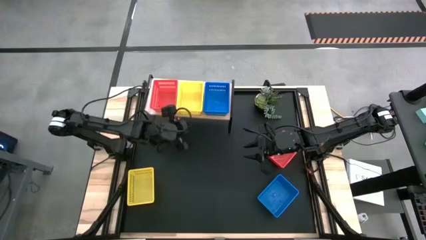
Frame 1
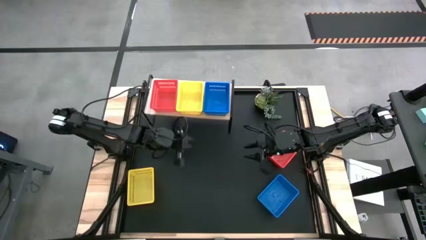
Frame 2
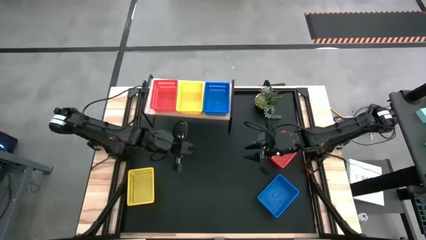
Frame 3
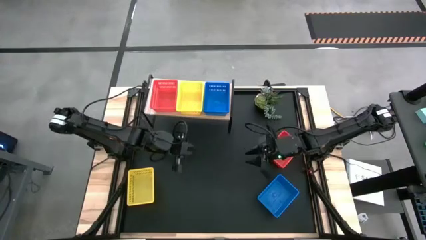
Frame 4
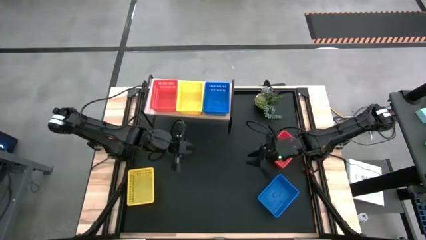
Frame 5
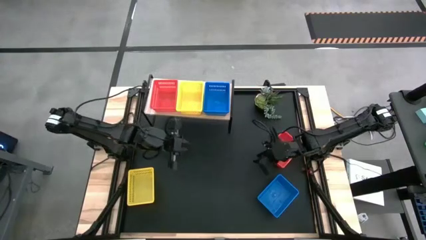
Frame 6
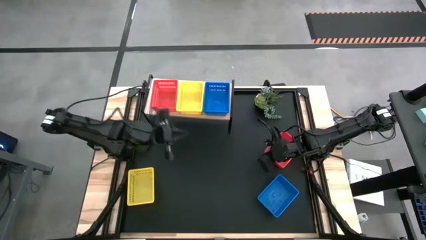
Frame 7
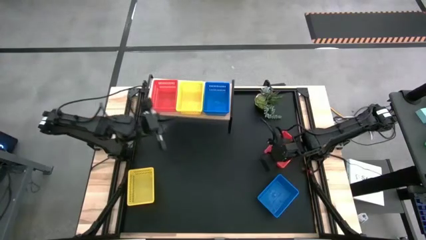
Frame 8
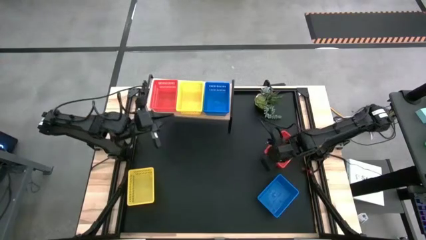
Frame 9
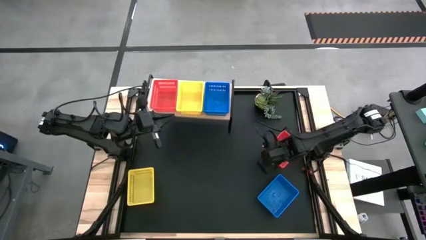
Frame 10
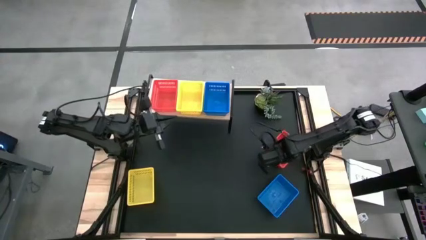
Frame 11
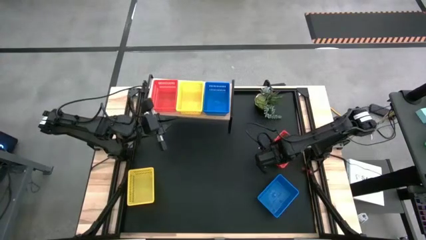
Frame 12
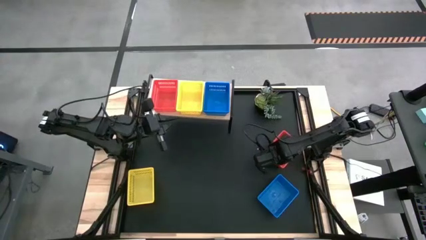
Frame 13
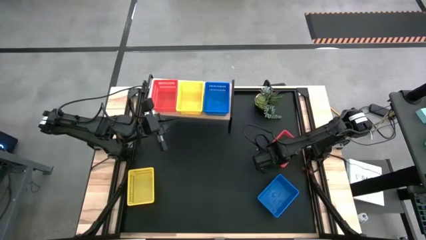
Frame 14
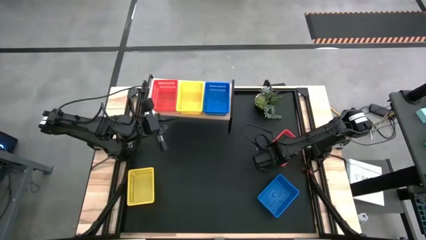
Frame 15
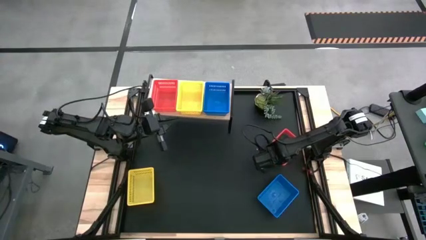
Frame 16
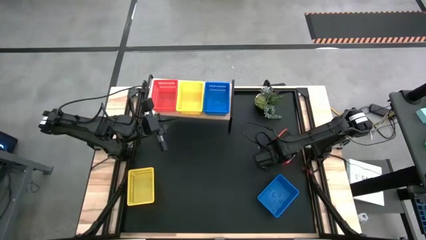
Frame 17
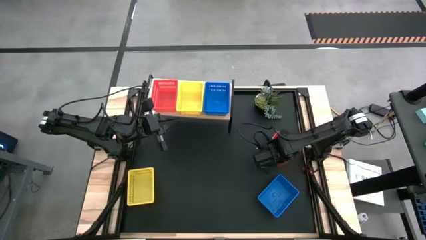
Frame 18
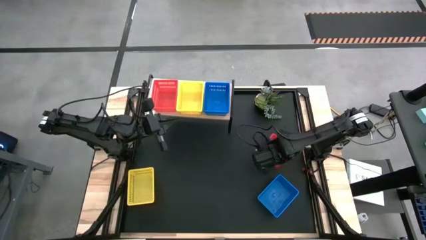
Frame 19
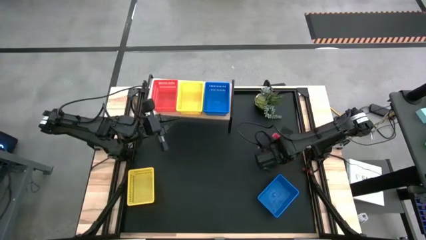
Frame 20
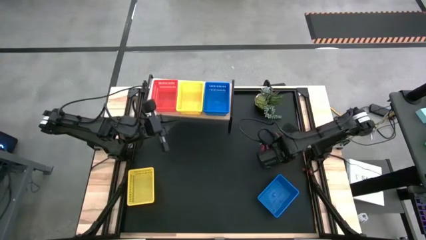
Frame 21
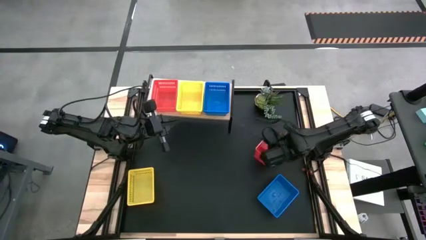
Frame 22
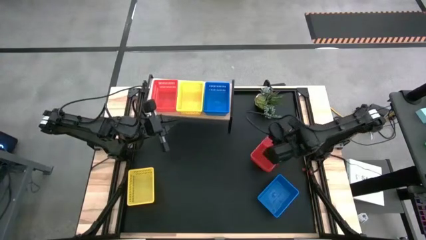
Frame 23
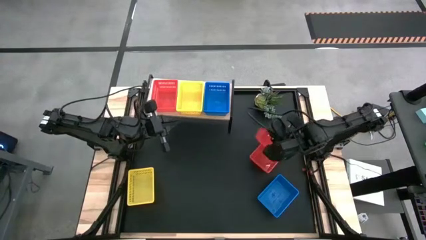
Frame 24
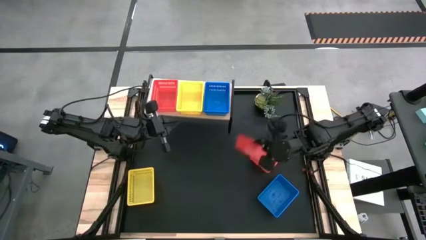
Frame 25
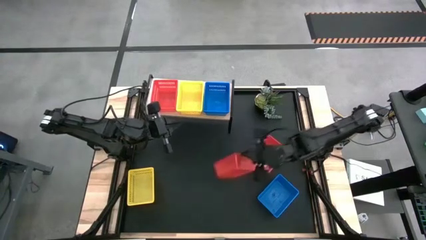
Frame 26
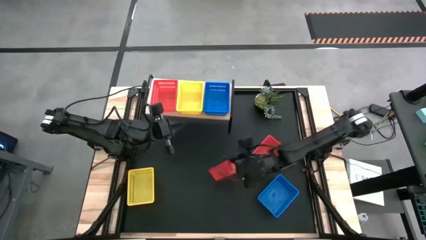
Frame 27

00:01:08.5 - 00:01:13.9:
Task: Stack baskets on shelf by color
Stack the left red bin on top of the red bin on the shelf

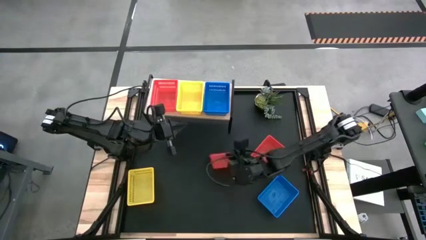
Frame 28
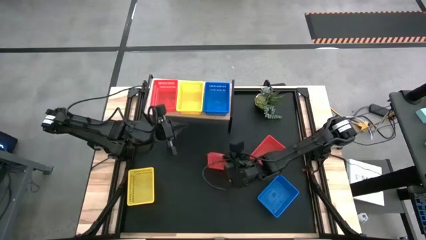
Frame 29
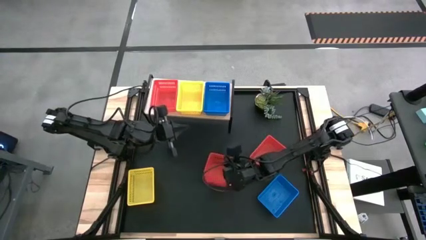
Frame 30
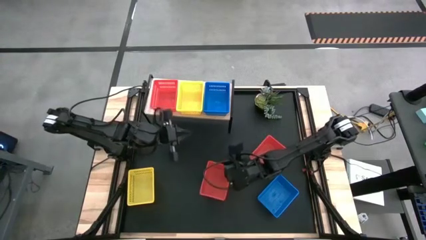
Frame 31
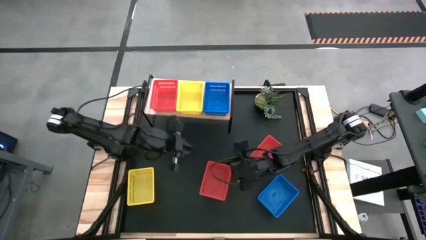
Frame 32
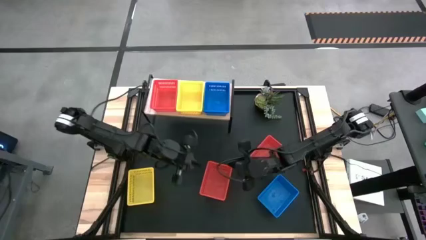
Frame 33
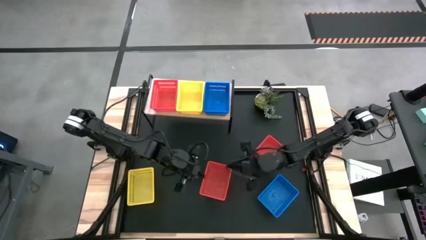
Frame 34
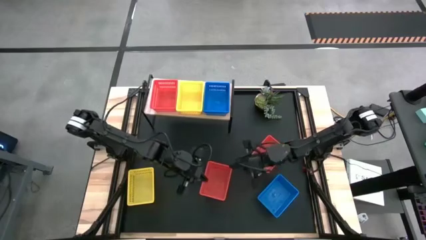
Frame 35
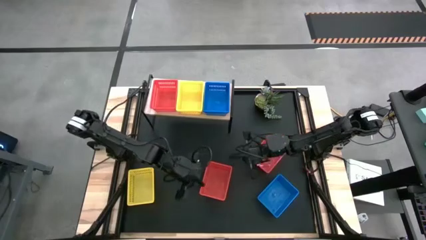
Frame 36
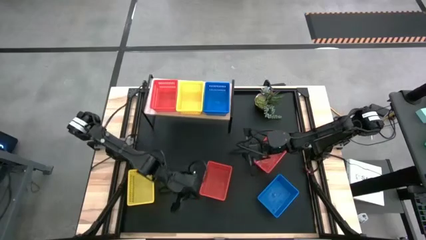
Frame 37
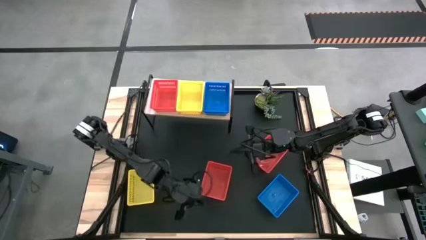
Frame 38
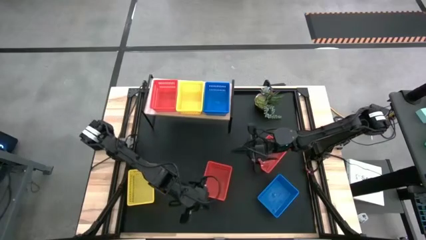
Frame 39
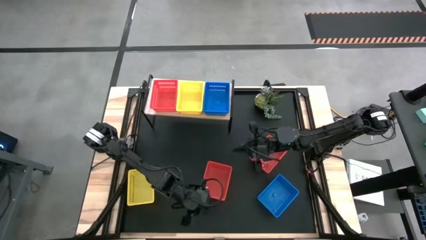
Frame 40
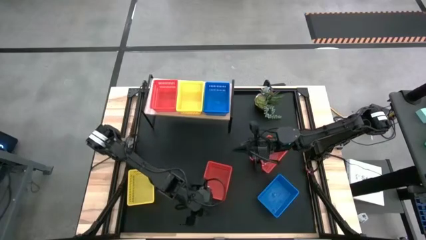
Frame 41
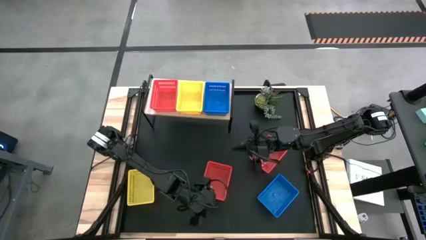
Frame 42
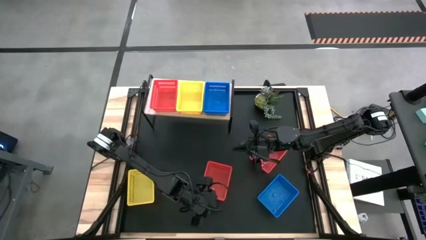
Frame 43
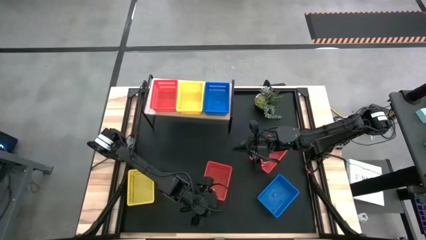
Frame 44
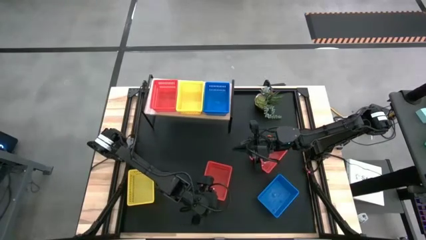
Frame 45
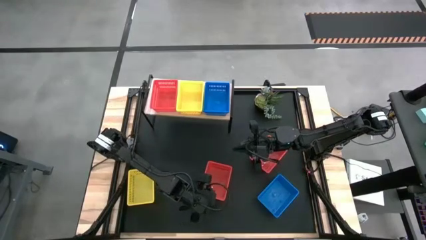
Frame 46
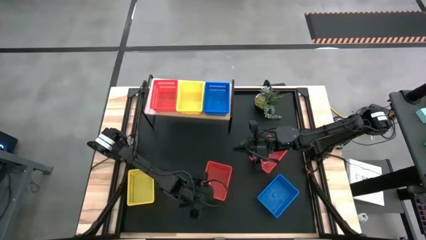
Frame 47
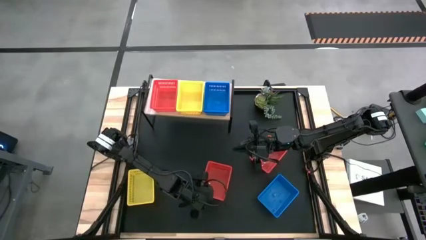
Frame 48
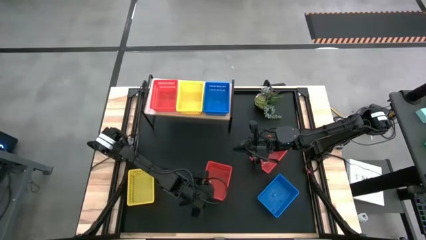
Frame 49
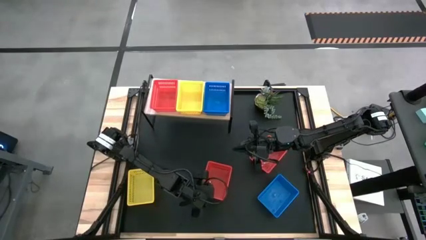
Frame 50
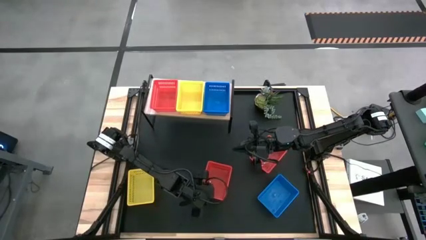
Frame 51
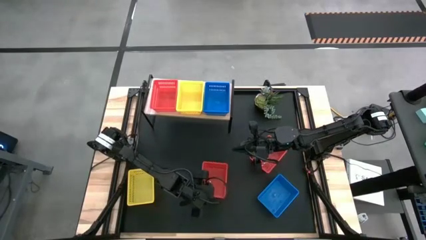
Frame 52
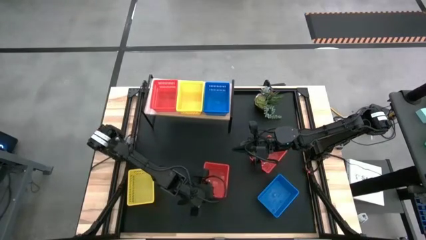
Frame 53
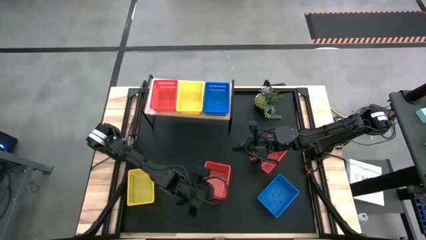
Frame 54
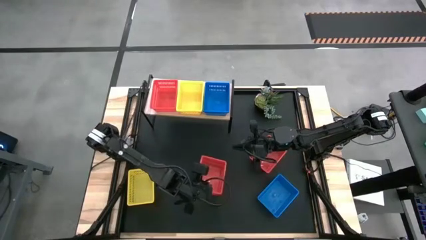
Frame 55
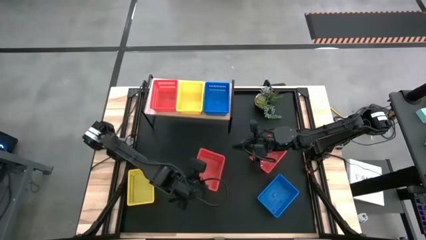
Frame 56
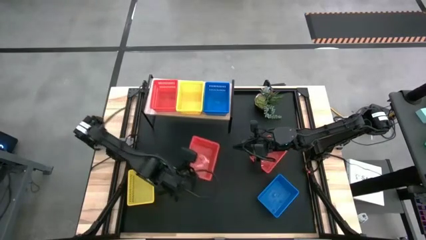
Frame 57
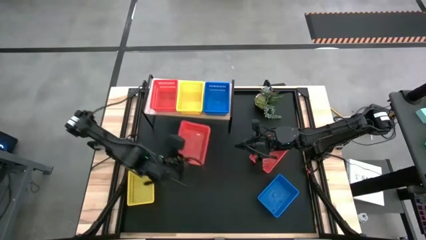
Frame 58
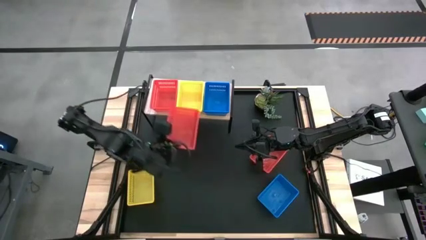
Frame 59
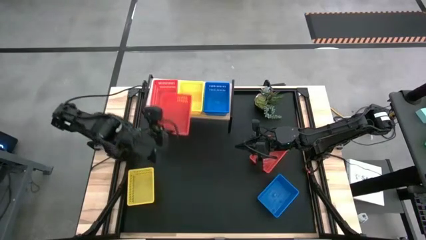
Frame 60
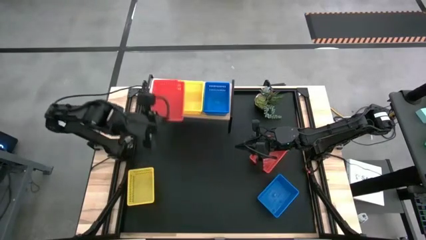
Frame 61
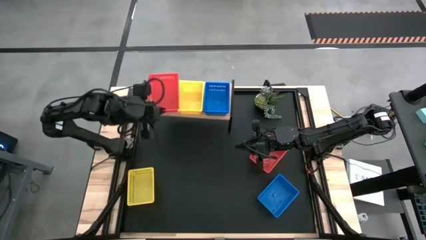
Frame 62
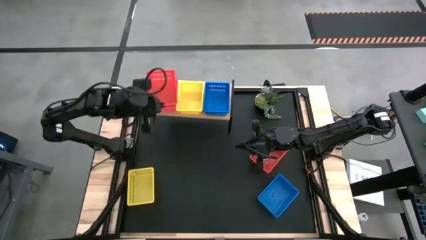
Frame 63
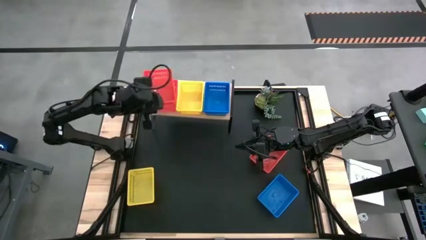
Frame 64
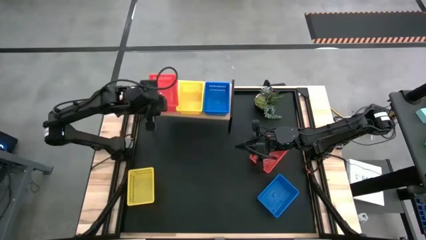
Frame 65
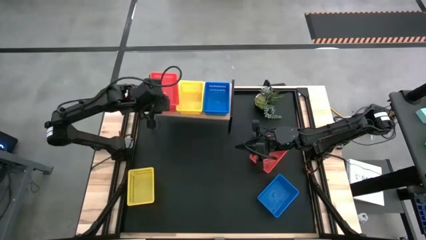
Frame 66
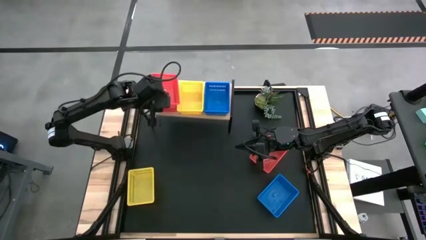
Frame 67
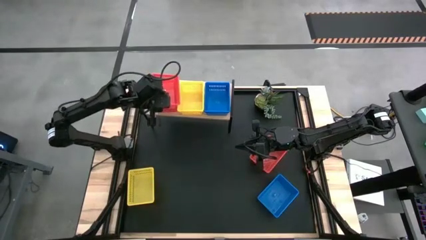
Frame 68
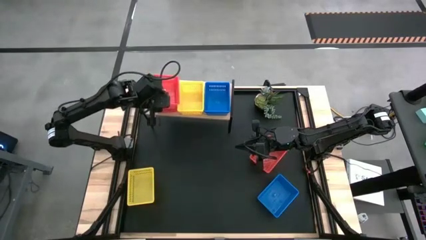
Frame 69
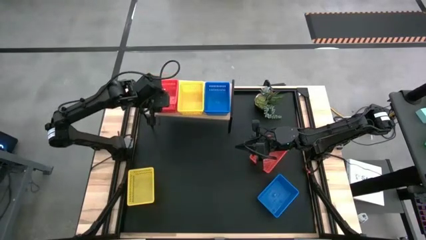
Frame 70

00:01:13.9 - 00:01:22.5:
Stack the left red bin on top of the red bin on the shelf
